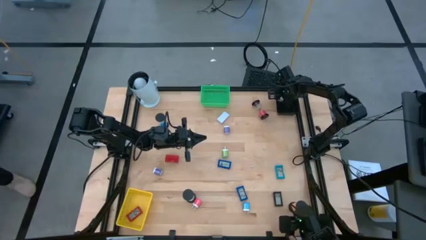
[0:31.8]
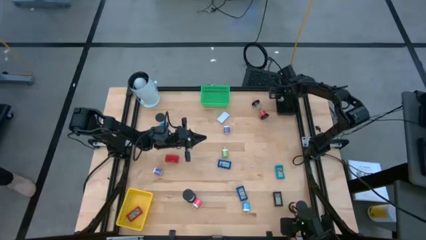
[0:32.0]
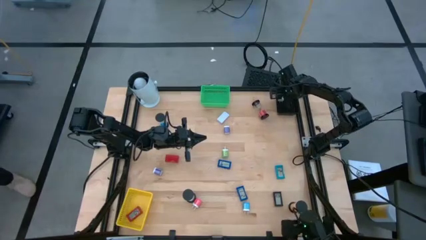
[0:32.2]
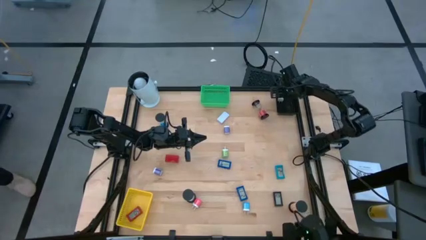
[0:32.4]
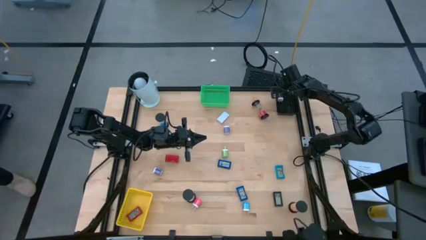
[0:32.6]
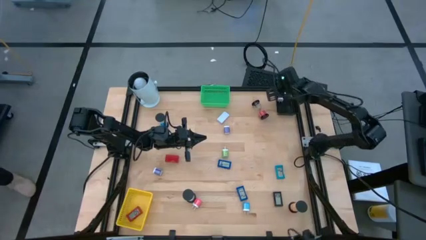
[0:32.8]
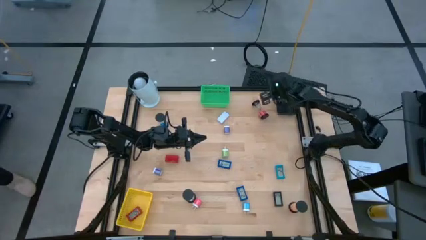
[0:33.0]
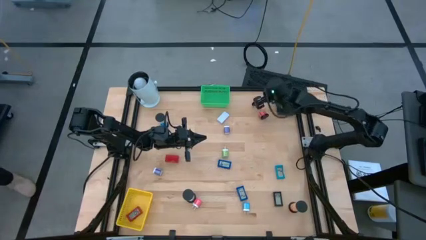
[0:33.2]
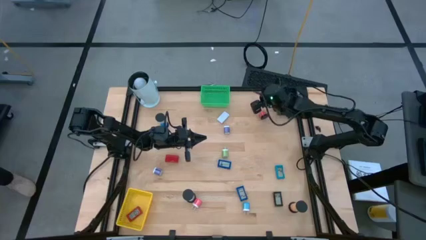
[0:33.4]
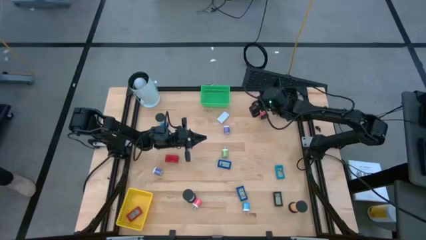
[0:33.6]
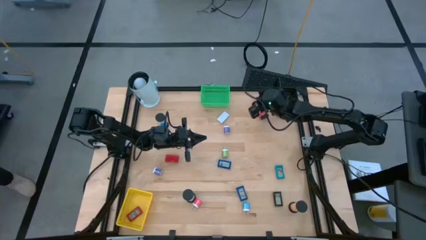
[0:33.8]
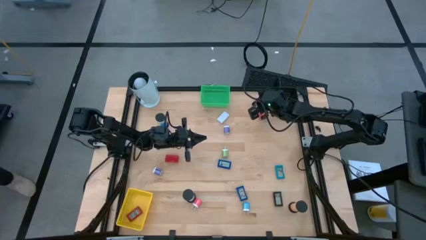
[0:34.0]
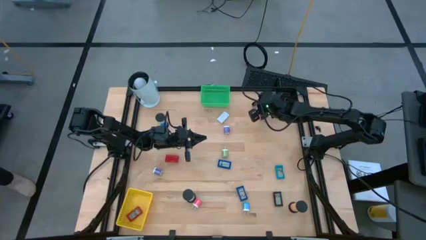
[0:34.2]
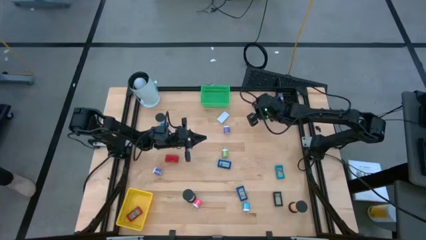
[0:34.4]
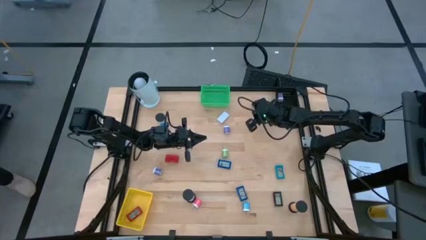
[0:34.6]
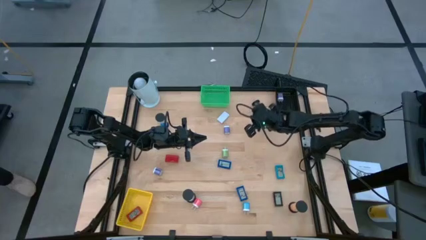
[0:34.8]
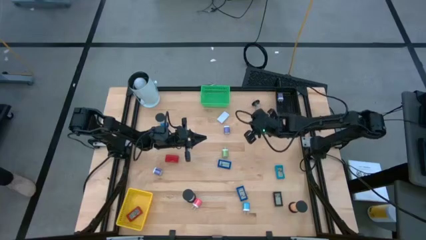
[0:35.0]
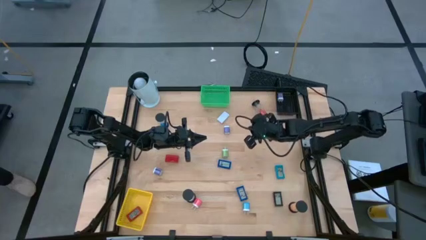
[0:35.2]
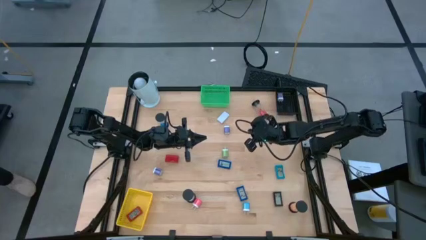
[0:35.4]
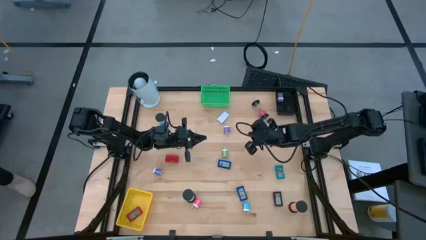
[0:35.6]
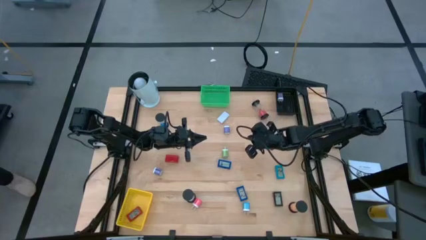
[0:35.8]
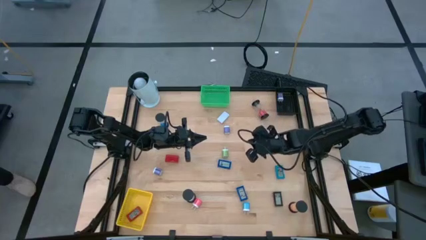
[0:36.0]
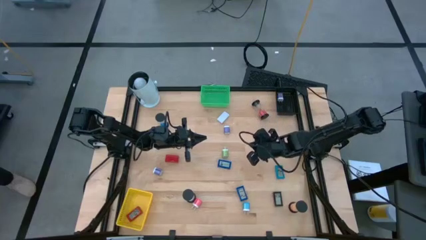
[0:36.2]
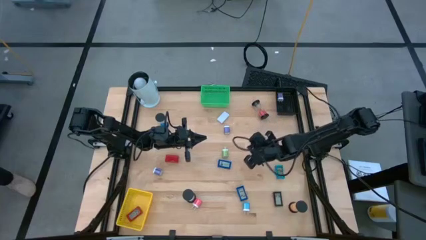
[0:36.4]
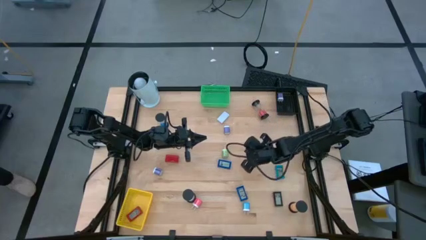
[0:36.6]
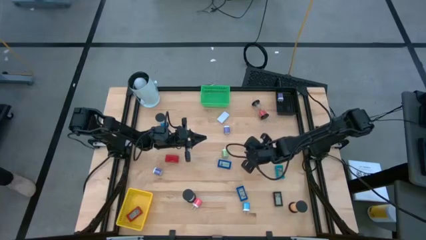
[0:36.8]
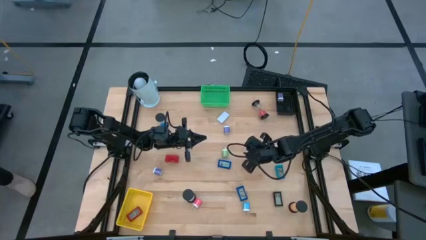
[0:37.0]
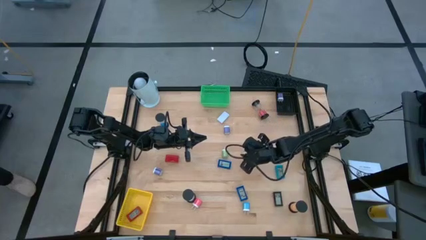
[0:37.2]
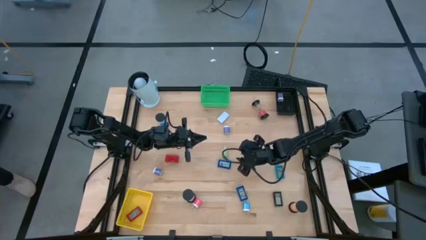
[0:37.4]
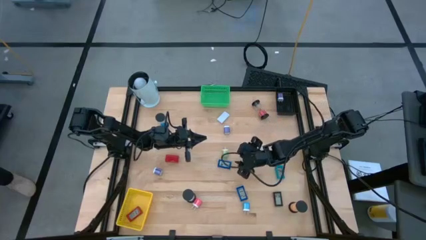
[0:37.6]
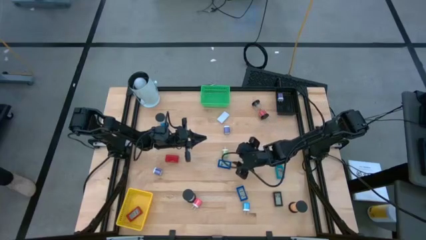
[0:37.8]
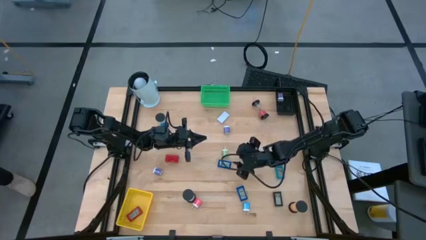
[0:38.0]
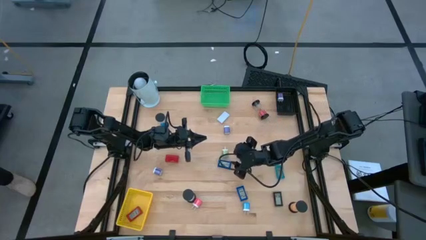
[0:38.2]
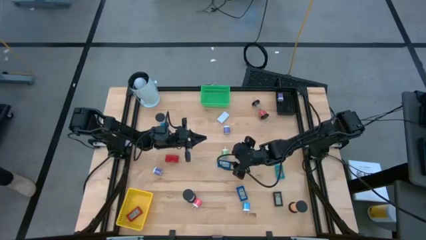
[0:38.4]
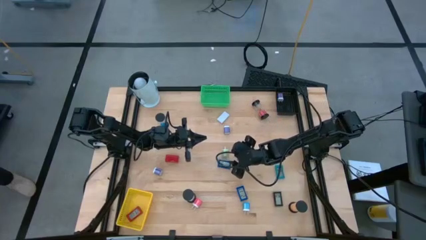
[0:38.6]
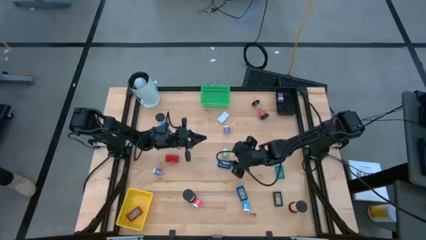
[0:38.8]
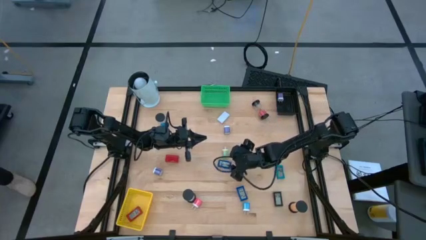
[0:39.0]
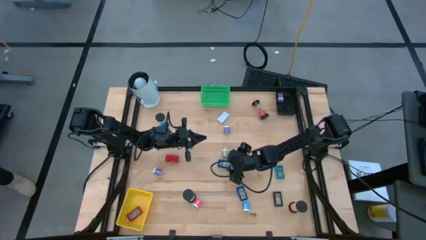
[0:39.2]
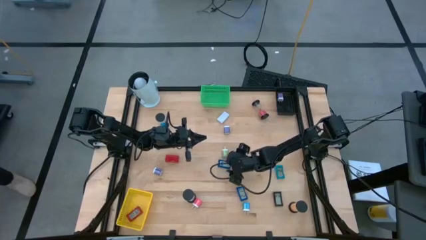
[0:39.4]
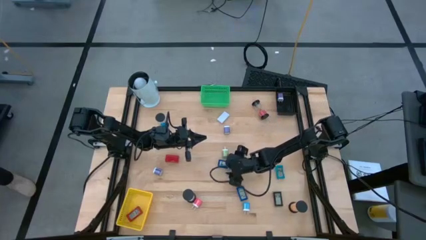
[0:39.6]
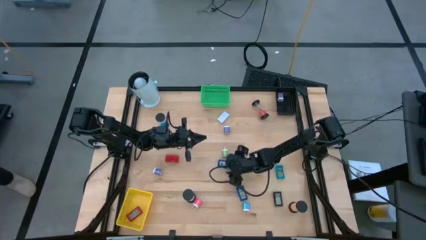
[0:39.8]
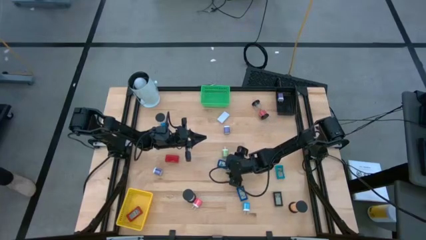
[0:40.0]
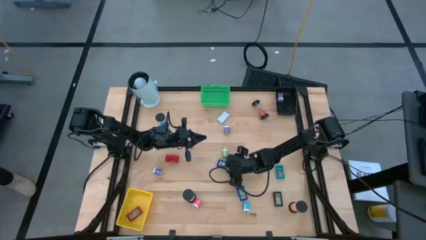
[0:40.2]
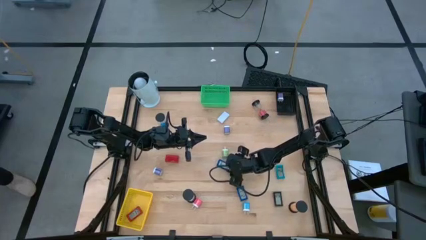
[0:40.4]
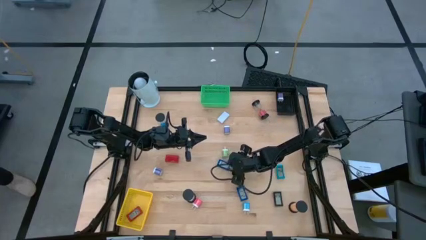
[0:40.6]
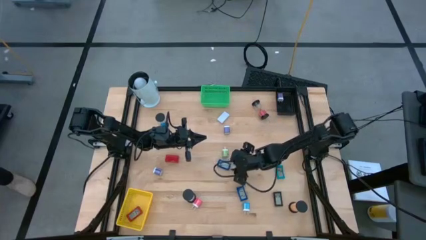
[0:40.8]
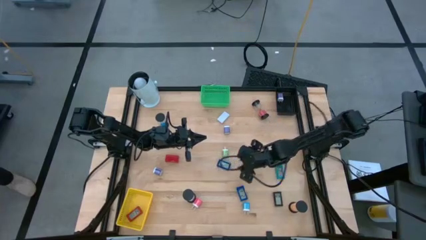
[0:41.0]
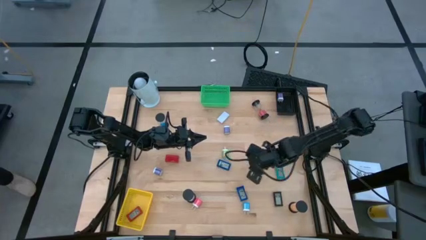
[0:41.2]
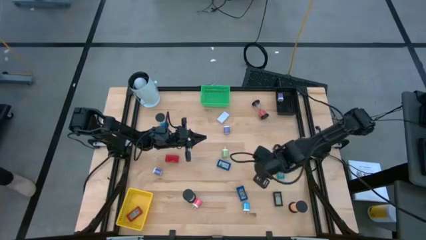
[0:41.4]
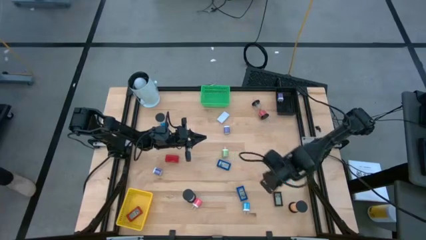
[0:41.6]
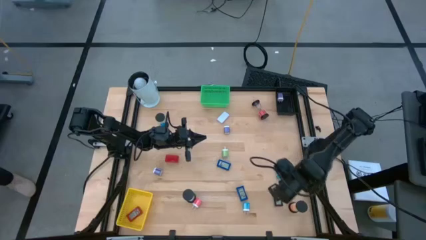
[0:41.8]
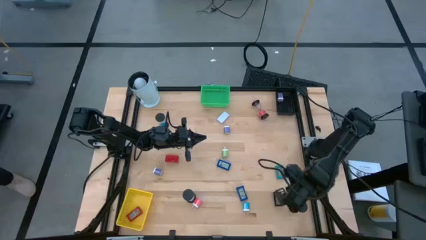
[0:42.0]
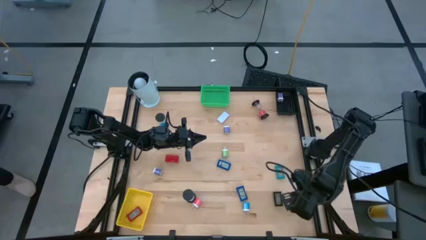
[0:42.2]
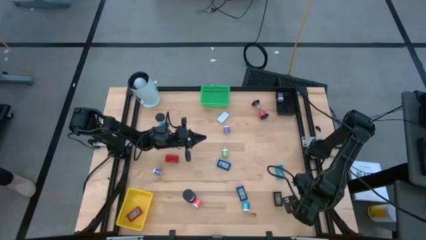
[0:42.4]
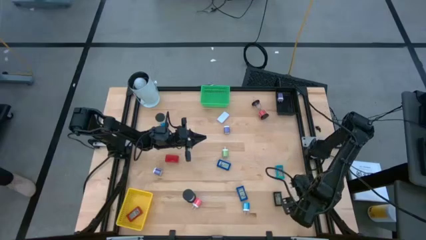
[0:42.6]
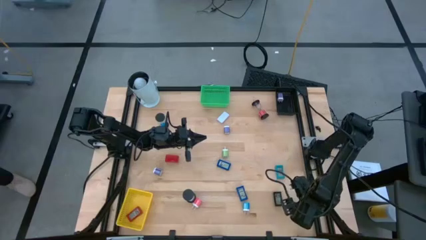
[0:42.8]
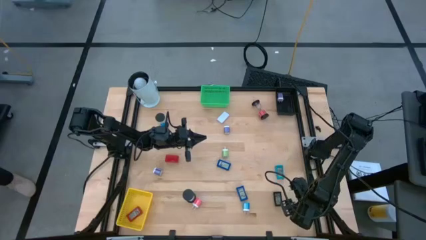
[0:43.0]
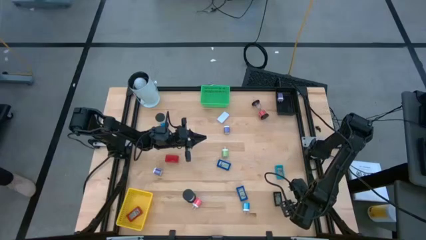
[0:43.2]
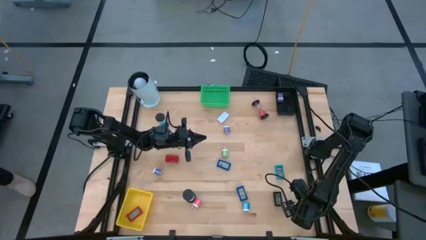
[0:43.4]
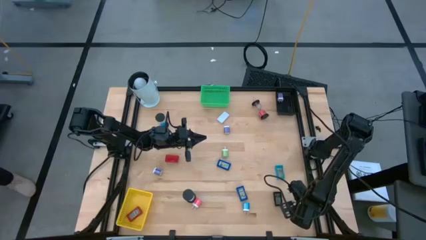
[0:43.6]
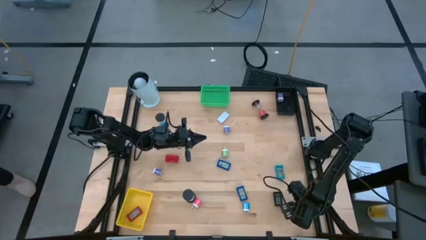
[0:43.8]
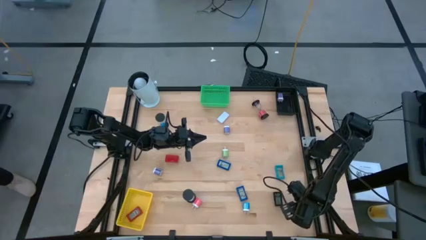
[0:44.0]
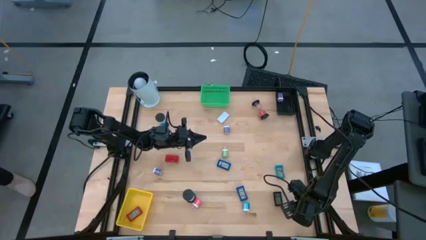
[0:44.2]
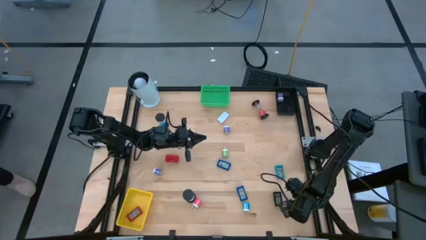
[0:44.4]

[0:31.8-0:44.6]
Task: Pick & Place Office items
Put the yellow hourglass into the green basket
